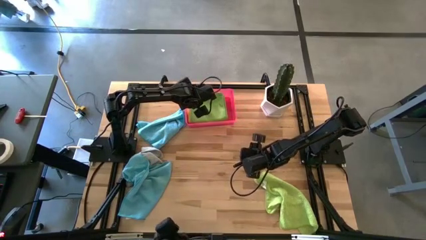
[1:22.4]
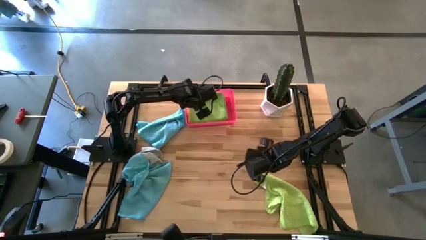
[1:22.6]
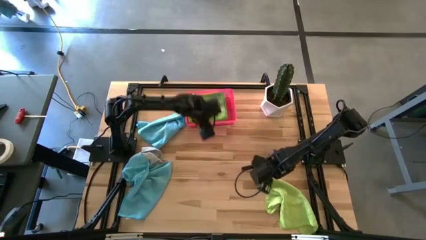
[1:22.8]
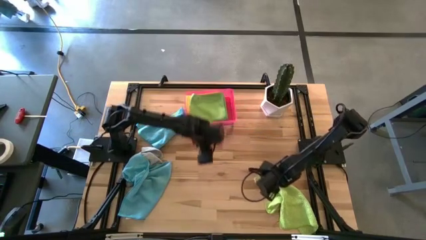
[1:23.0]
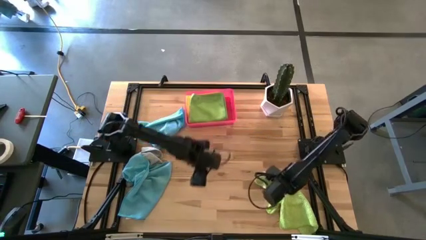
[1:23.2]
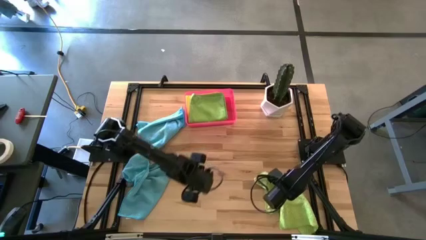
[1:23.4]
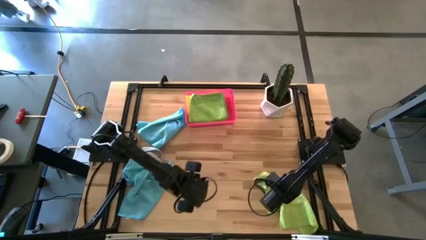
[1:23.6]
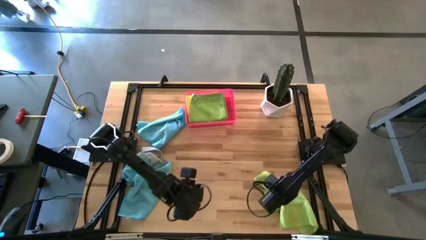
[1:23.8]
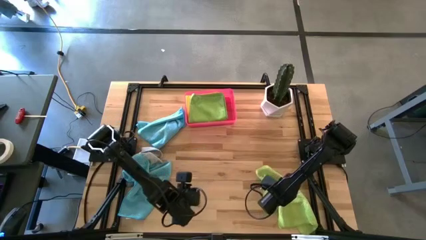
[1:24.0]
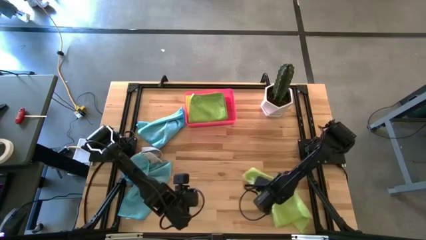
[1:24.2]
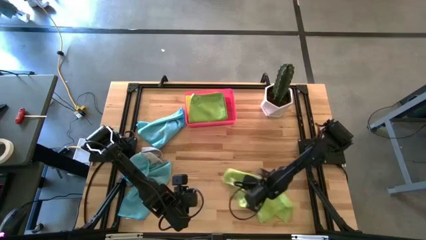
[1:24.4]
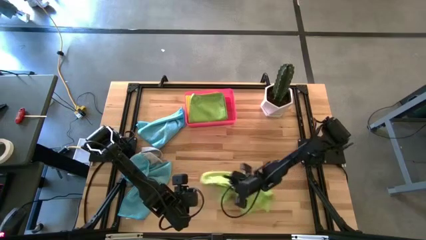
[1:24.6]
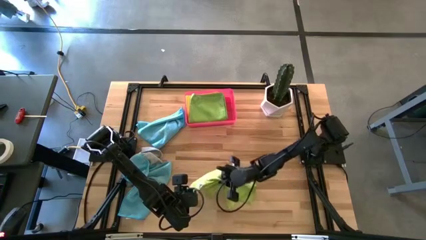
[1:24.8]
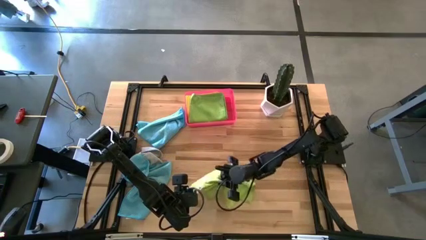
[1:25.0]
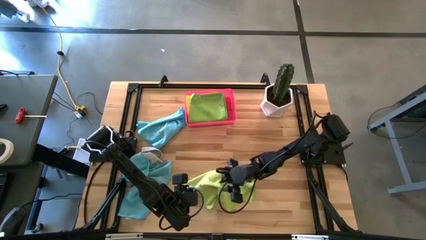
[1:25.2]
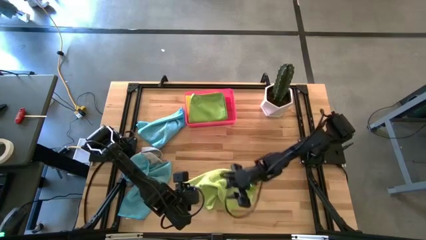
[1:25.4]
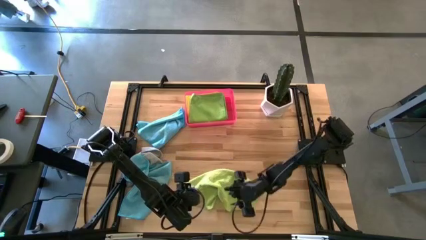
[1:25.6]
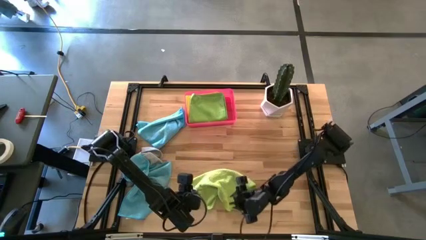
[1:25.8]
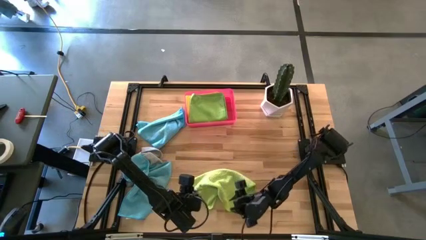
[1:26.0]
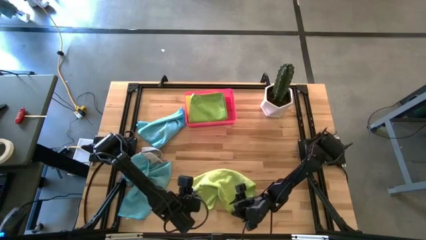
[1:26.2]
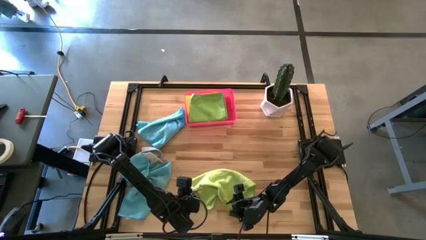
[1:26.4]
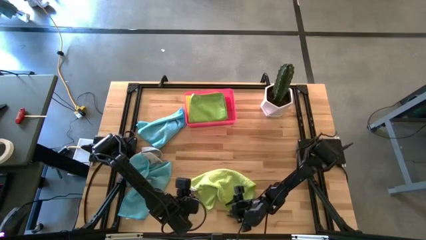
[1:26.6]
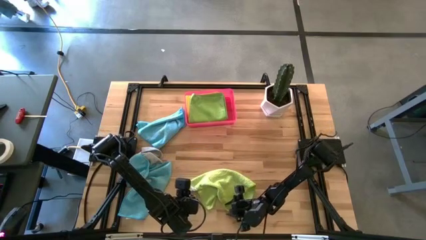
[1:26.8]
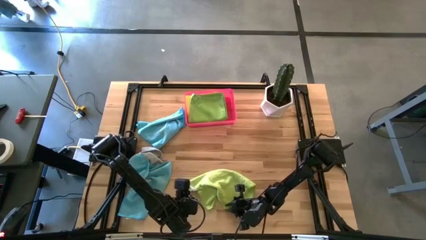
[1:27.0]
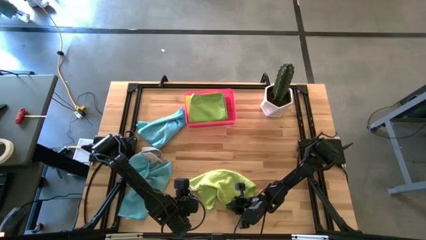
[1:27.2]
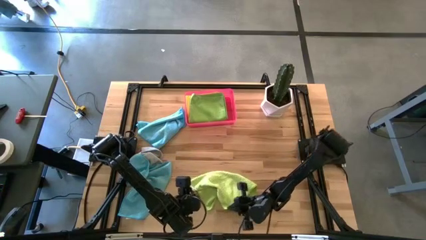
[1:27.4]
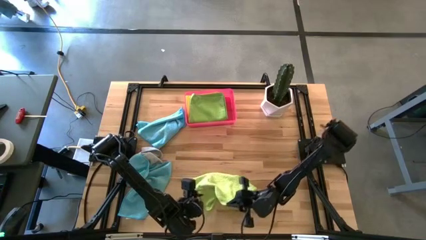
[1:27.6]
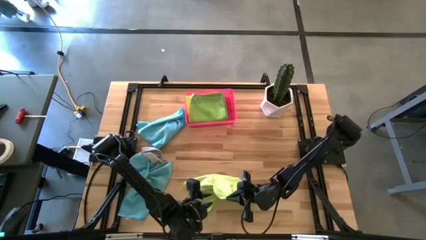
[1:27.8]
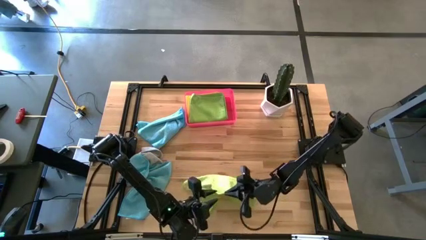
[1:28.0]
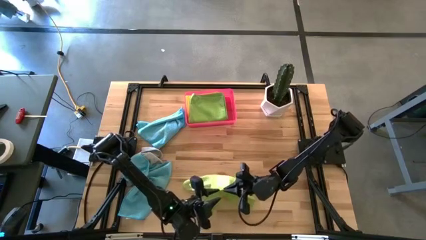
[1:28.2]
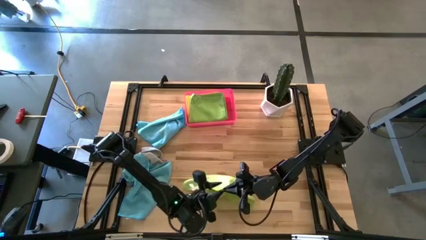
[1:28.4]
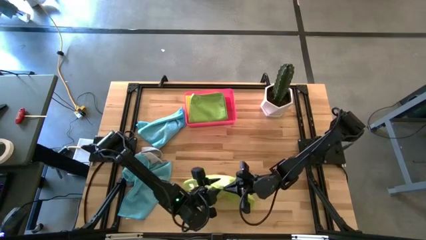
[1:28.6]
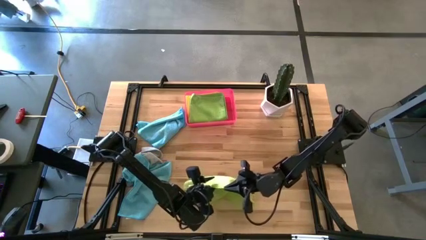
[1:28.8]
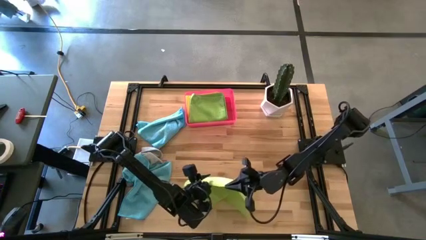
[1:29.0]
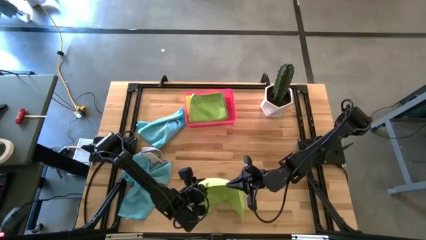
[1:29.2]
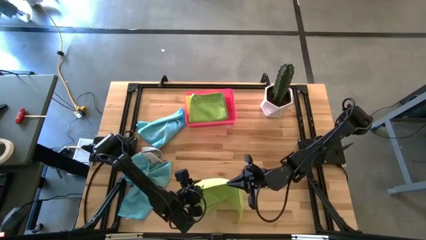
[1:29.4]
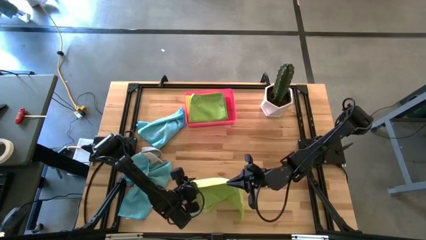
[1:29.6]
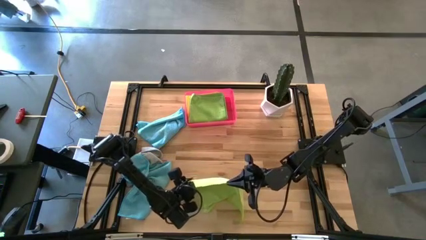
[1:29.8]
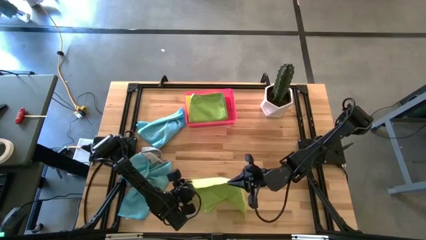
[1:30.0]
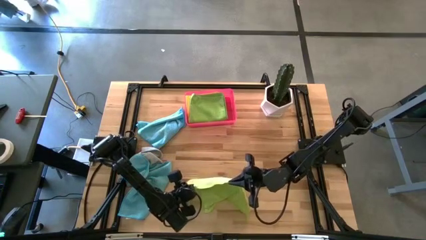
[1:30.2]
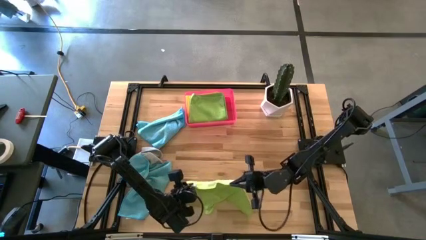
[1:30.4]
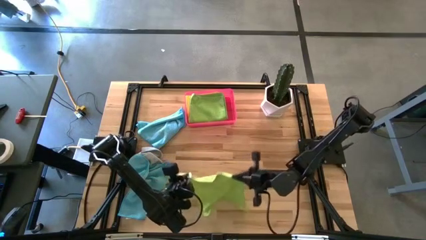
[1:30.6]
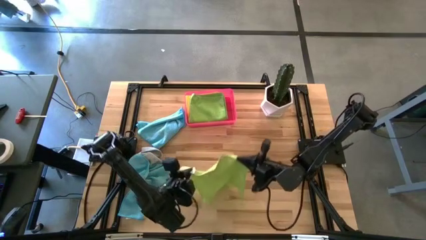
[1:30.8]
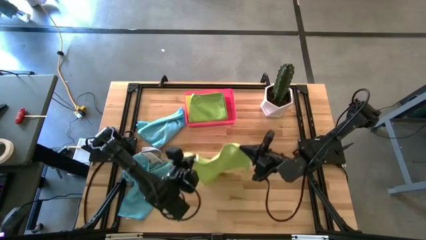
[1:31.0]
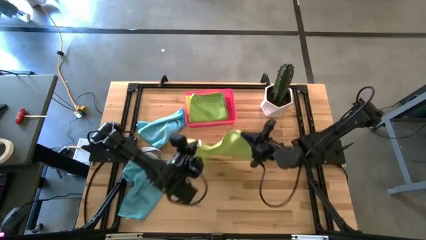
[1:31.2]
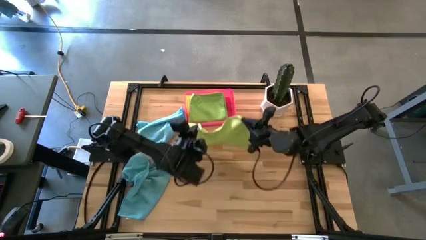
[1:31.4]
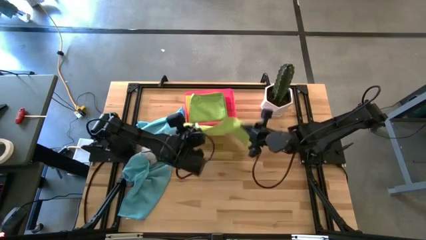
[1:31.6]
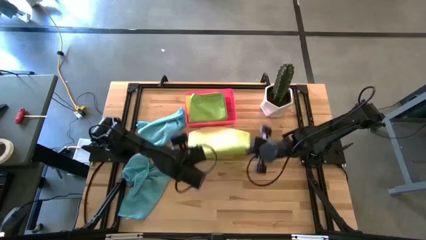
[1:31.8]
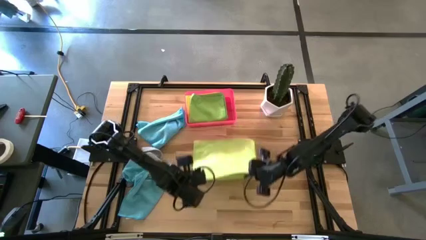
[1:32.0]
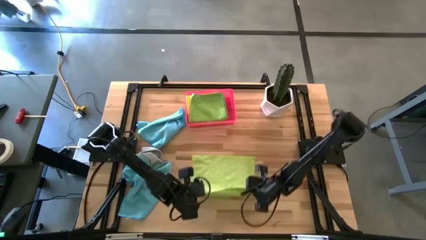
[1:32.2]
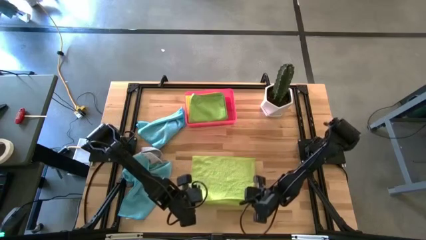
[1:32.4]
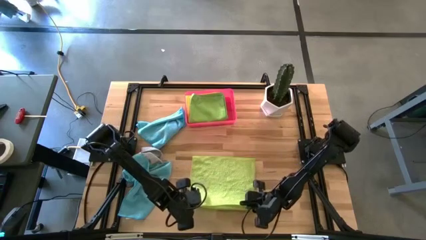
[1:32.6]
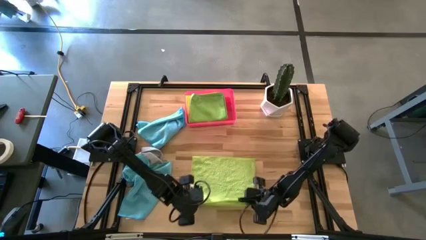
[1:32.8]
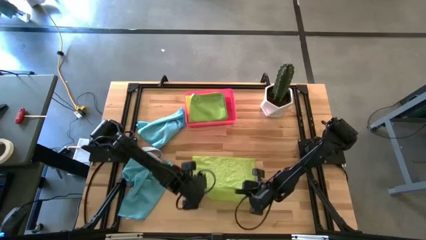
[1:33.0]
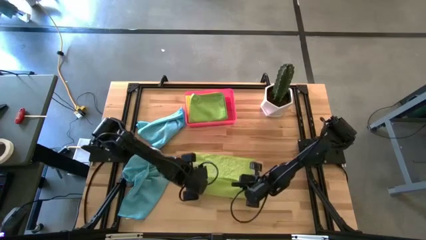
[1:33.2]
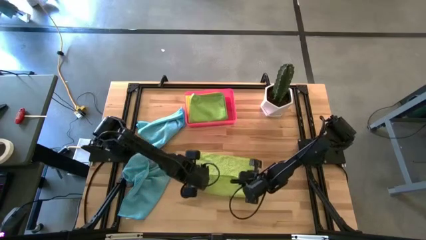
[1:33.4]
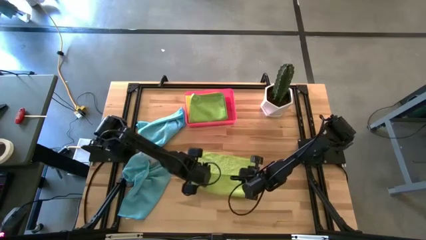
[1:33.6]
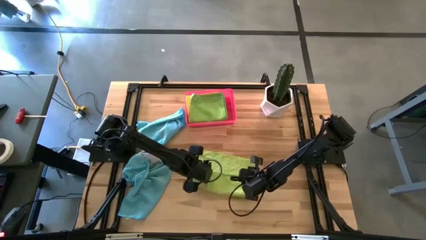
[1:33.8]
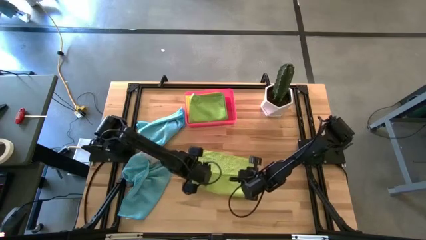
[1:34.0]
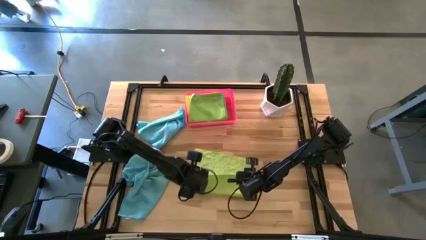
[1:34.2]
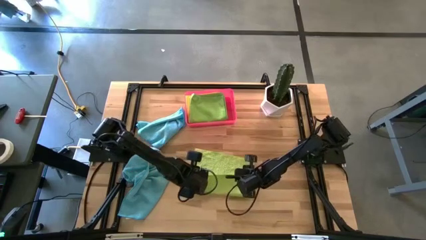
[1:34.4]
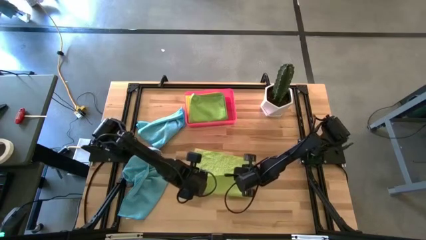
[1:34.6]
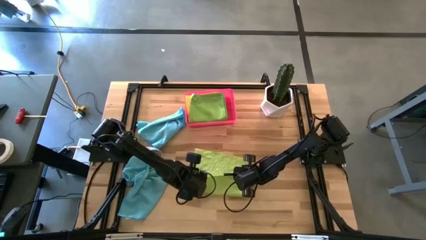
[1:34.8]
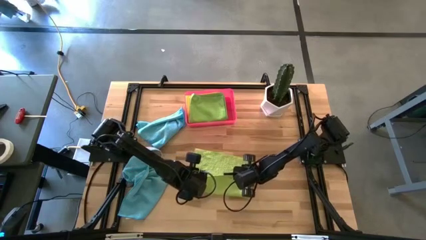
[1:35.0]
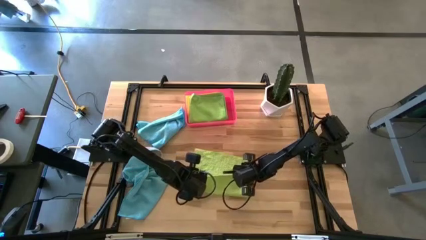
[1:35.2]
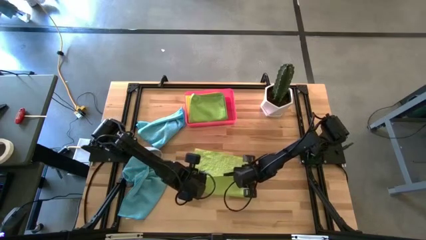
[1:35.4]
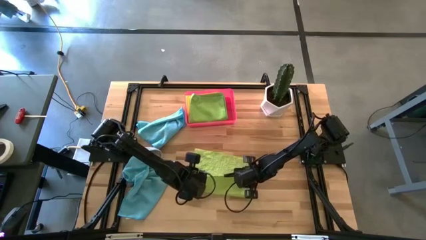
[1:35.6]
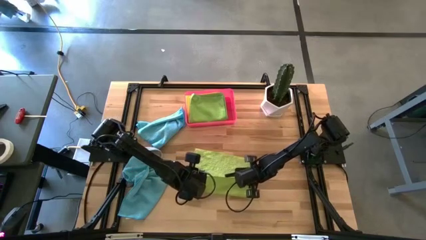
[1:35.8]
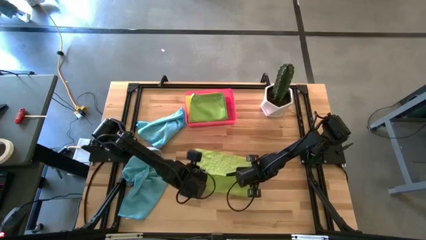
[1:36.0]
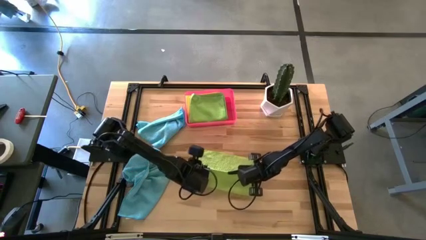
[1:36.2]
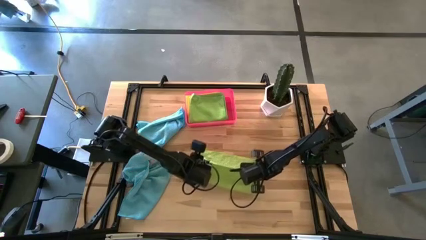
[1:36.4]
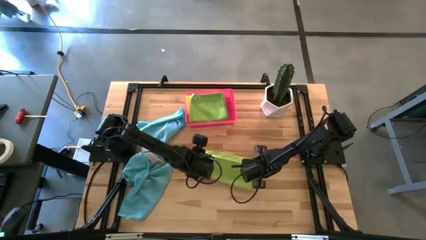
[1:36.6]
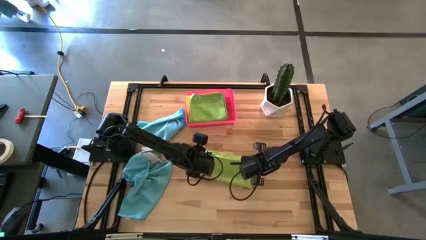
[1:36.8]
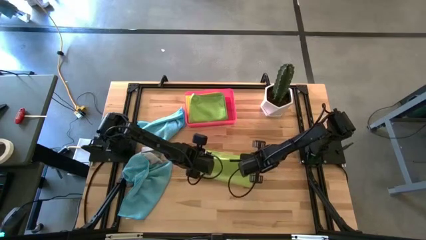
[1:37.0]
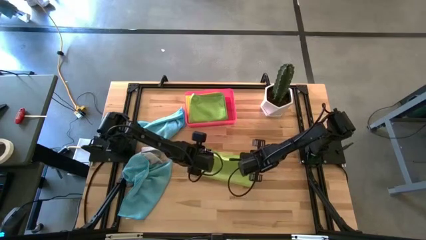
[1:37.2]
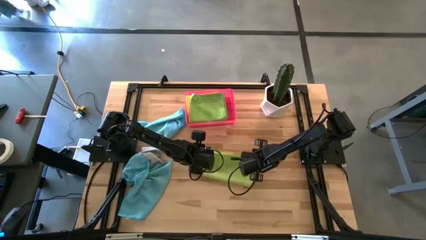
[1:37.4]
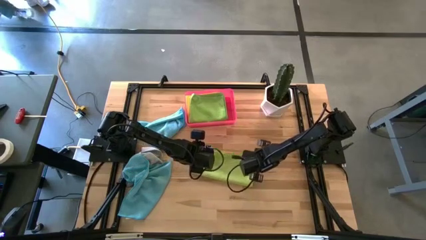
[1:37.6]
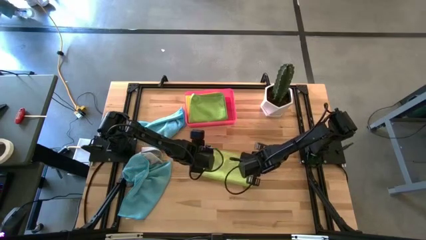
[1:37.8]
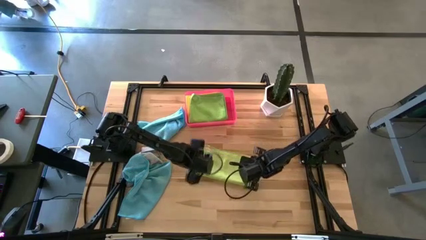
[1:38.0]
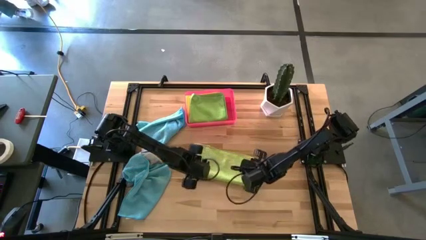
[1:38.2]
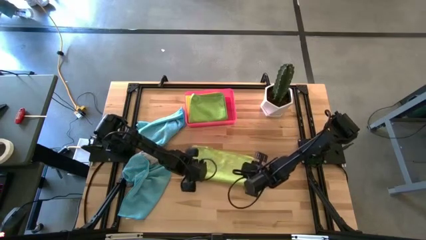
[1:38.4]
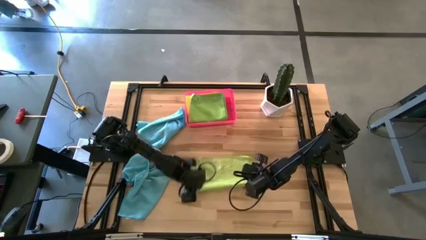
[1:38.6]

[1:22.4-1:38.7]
Task: Fold microfiber towels
Fold the light green microfiber cloth
